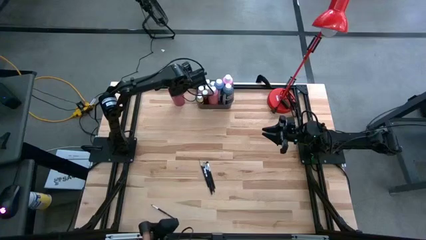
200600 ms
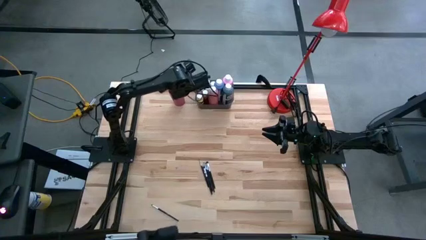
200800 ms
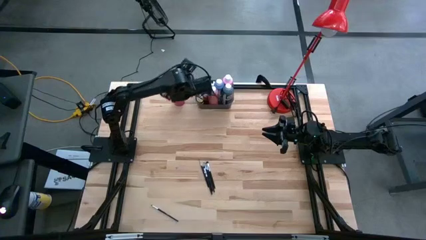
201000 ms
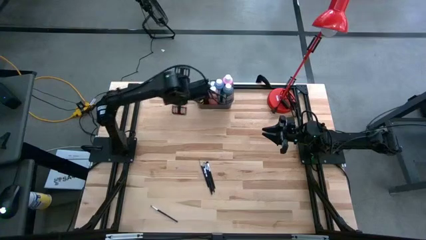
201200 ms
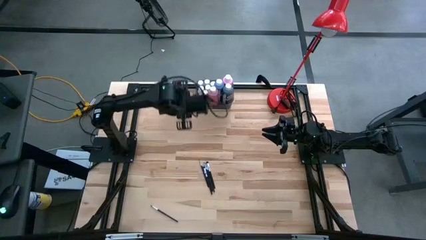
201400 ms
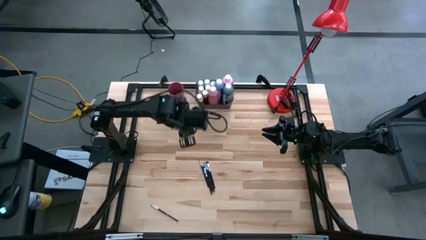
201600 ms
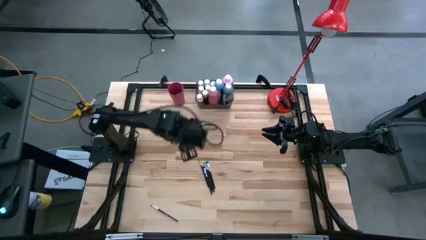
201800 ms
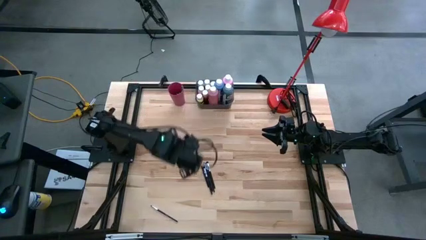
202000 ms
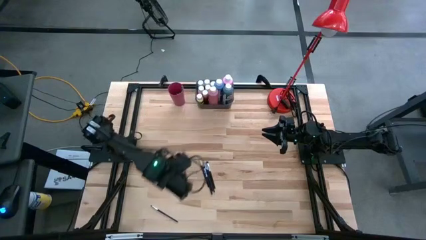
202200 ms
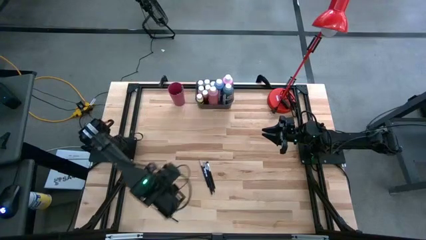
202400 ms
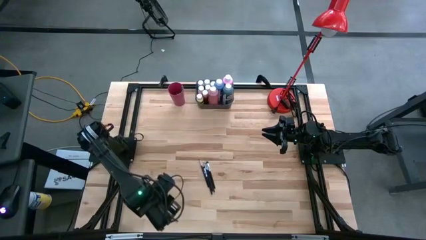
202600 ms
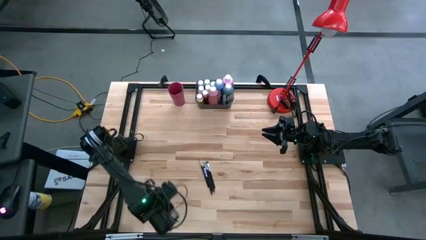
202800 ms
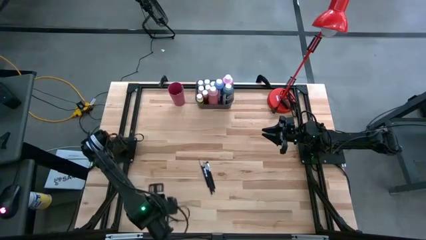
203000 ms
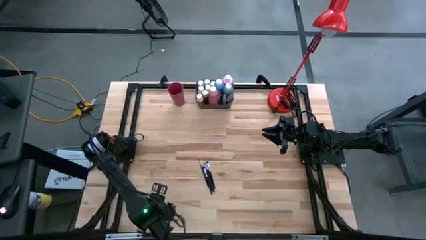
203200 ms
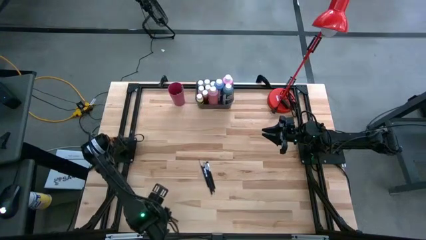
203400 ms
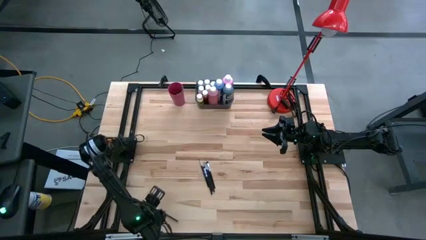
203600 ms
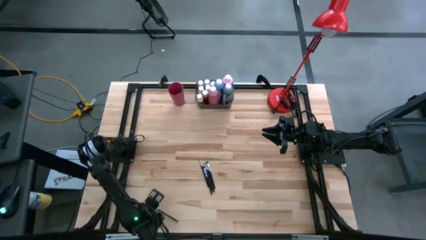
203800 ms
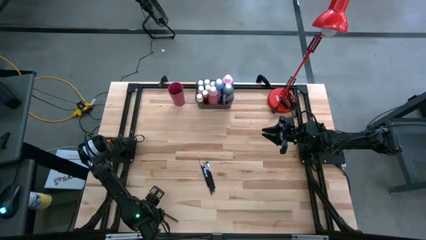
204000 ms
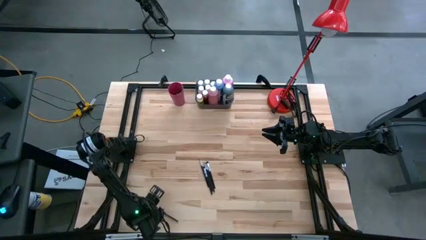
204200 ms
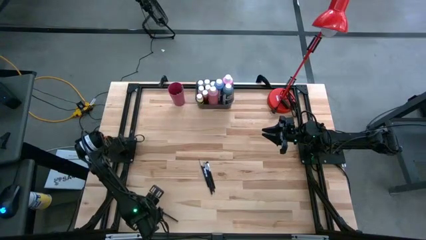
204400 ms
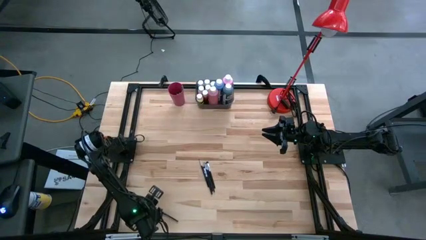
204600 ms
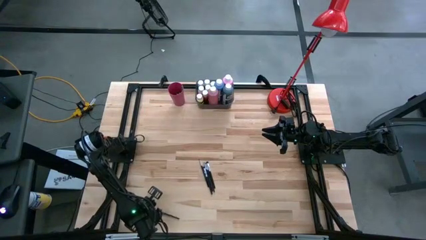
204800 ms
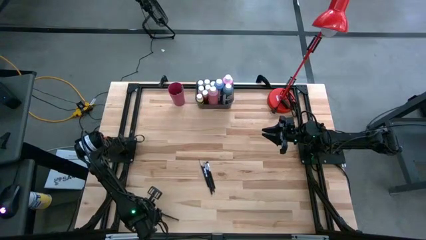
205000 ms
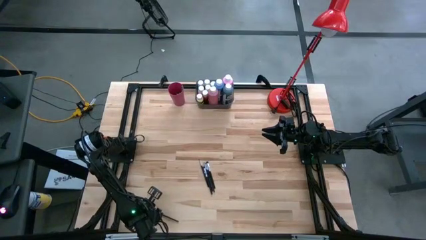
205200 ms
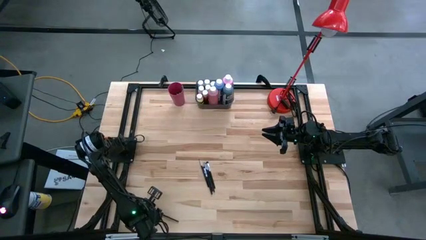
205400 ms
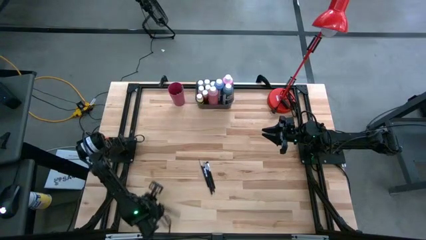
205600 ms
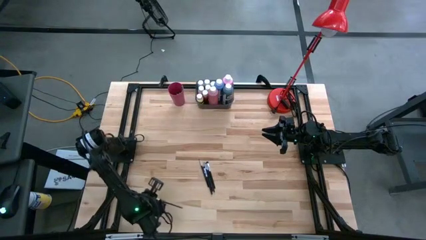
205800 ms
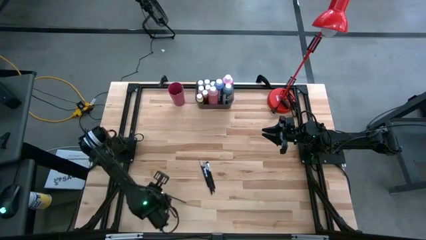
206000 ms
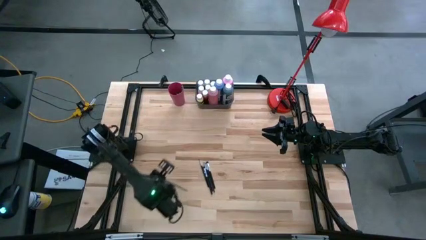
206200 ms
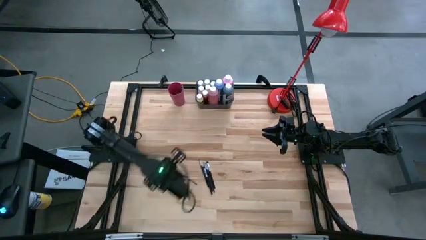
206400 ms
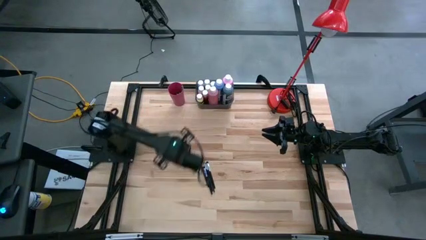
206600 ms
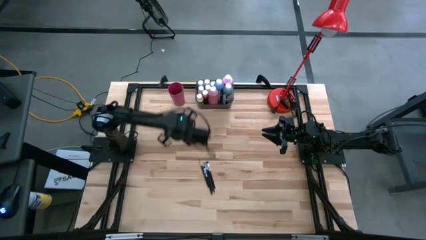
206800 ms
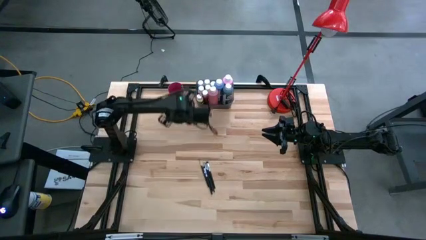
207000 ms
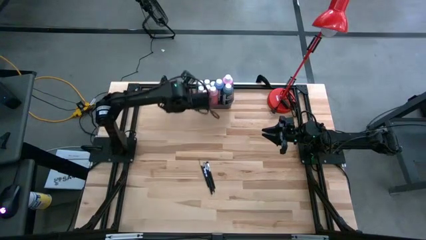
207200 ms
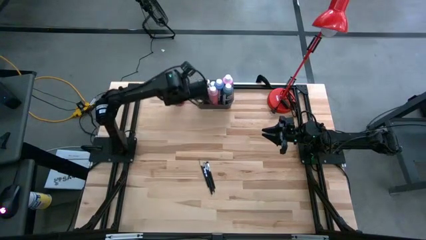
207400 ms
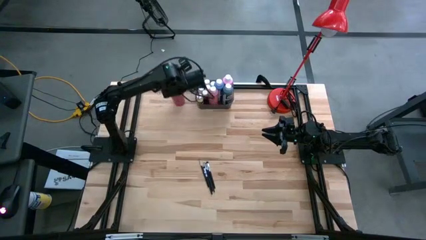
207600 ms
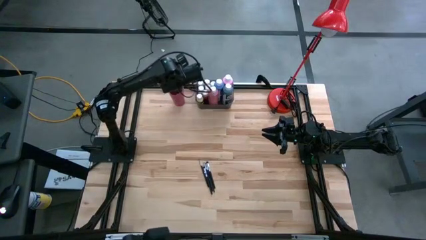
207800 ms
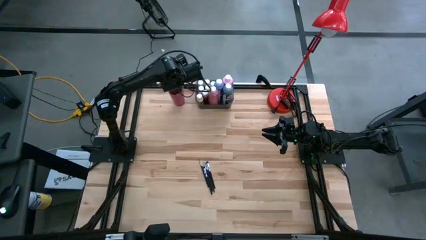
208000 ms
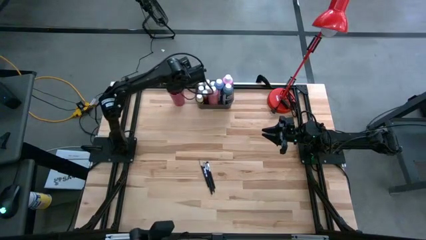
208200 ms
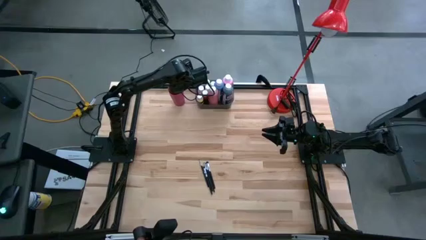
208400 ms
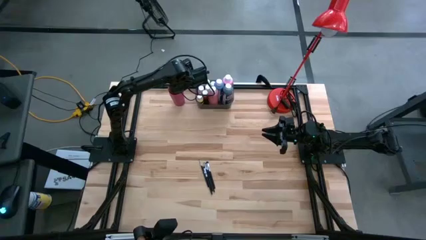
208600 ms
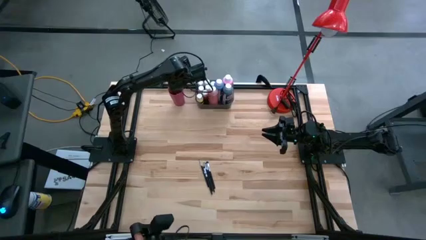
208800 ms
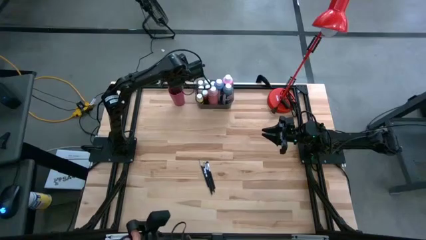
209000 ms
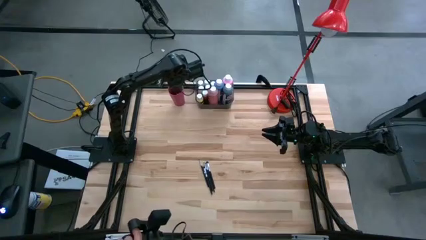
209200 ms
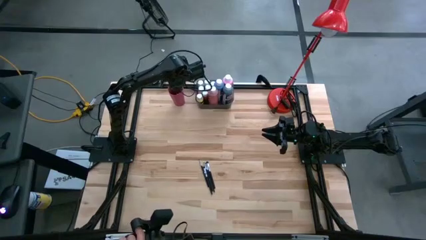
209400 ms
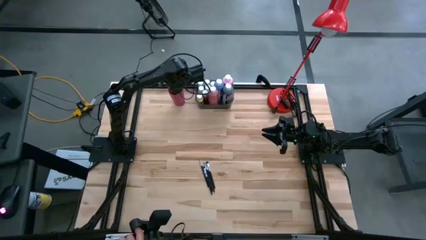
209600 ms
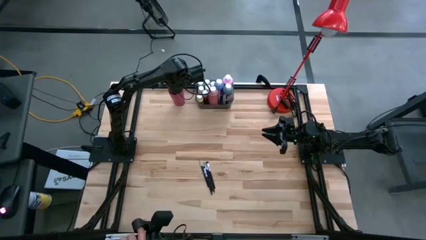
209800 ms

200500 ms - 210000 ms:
Task: Pick & Place Paint Supplies
Put the black paint brush into the pink cup

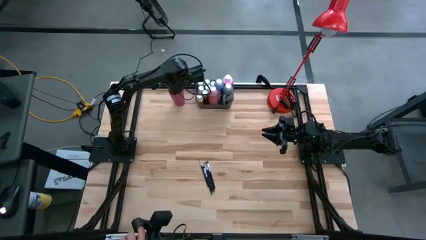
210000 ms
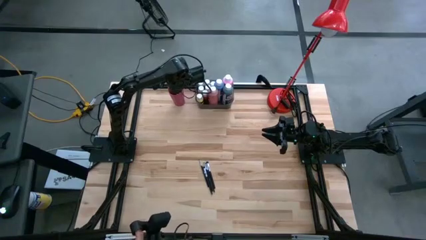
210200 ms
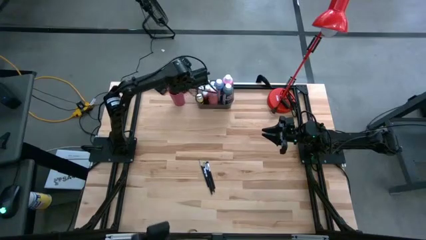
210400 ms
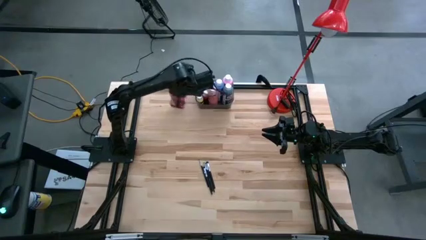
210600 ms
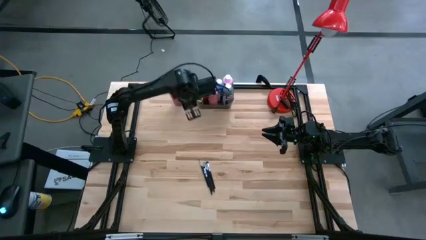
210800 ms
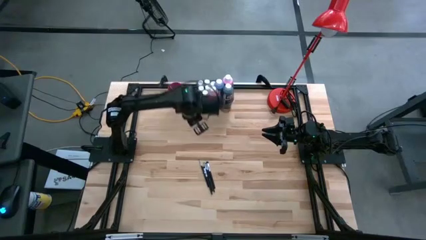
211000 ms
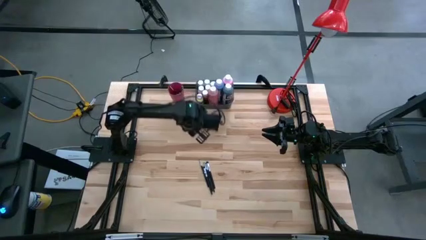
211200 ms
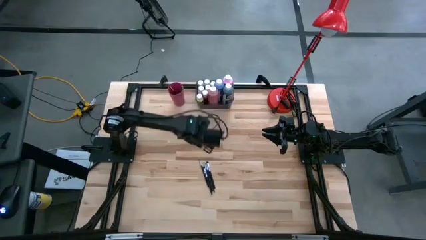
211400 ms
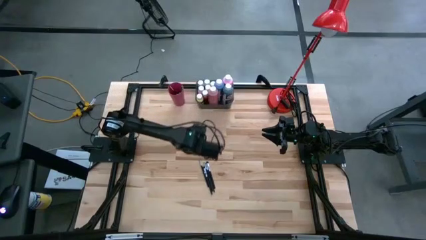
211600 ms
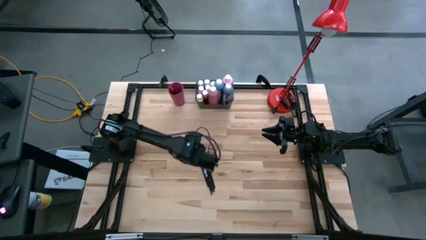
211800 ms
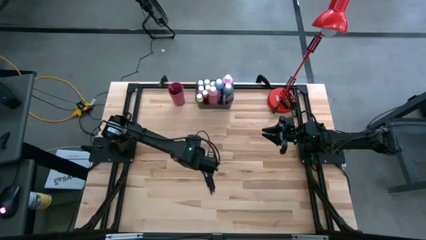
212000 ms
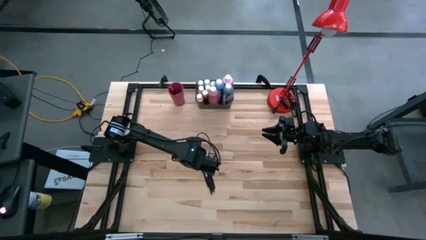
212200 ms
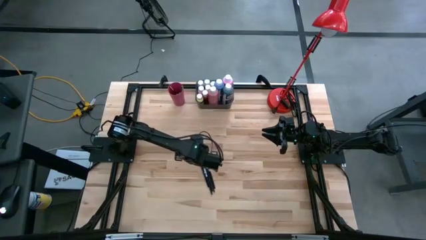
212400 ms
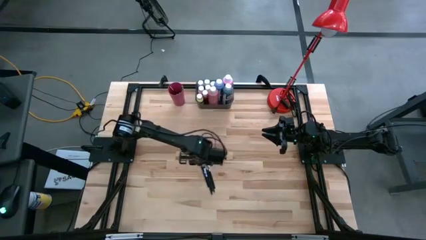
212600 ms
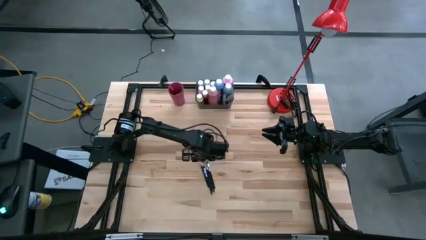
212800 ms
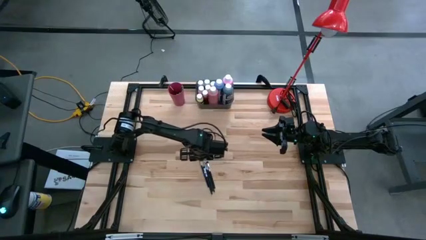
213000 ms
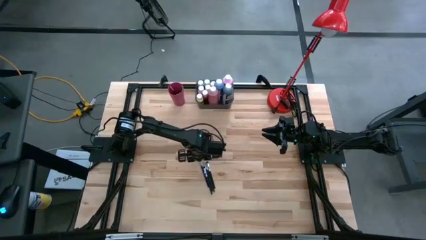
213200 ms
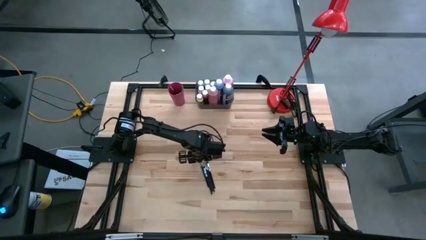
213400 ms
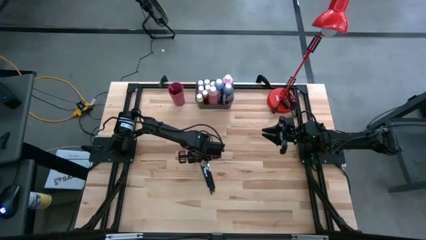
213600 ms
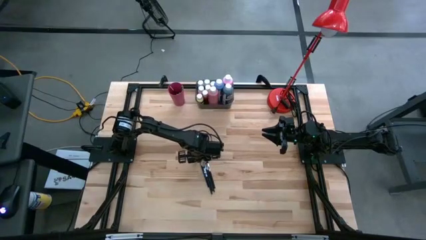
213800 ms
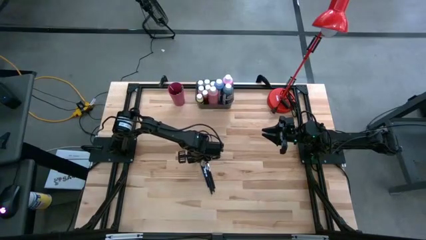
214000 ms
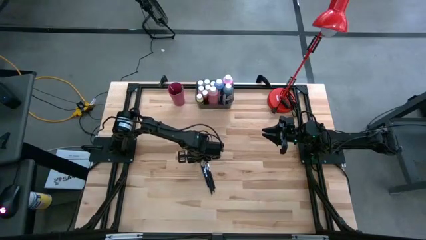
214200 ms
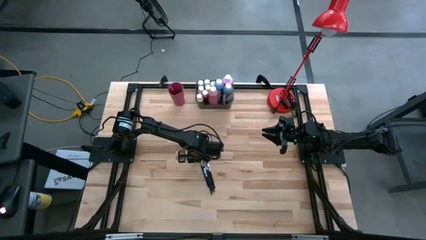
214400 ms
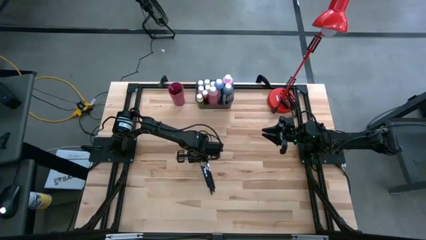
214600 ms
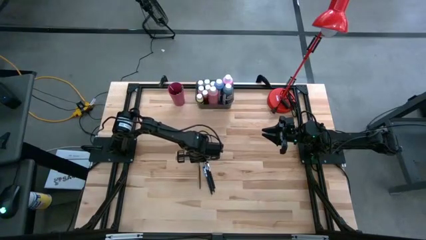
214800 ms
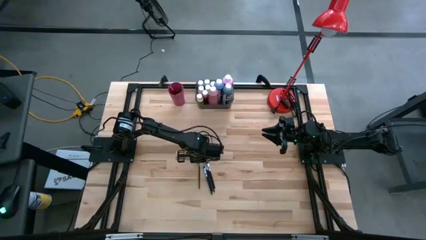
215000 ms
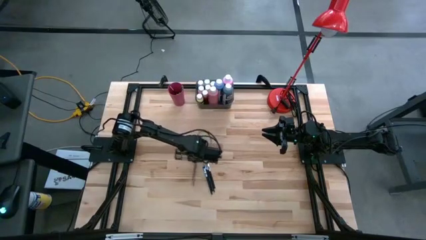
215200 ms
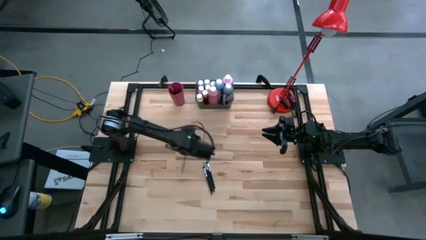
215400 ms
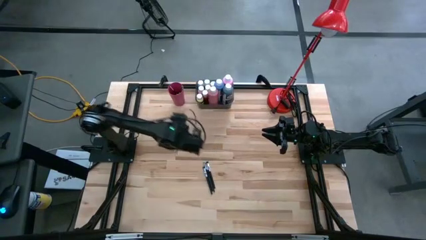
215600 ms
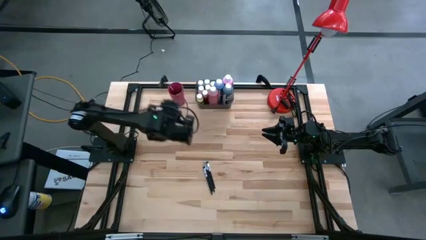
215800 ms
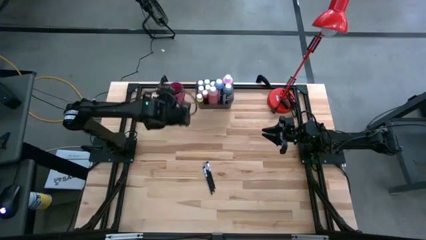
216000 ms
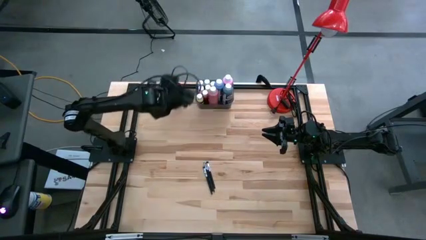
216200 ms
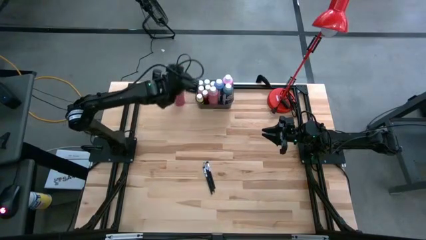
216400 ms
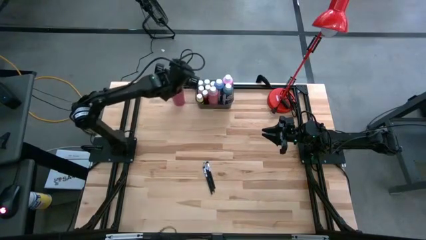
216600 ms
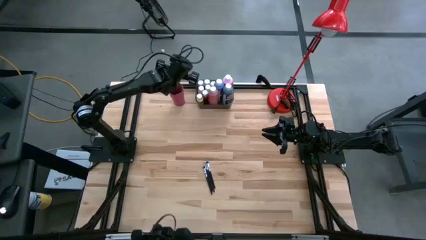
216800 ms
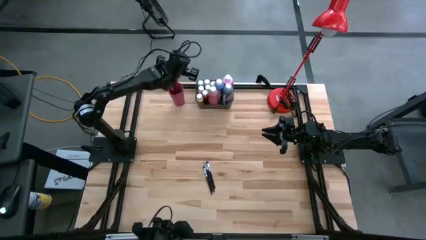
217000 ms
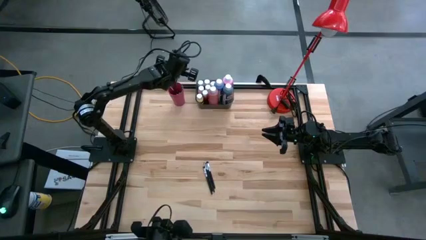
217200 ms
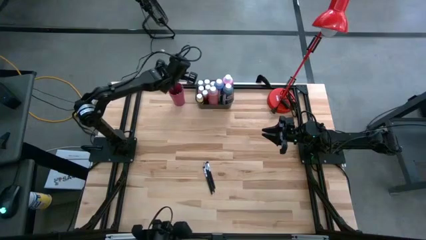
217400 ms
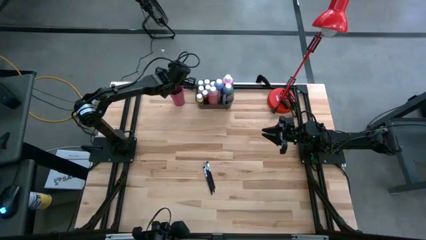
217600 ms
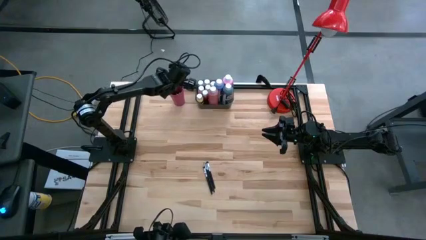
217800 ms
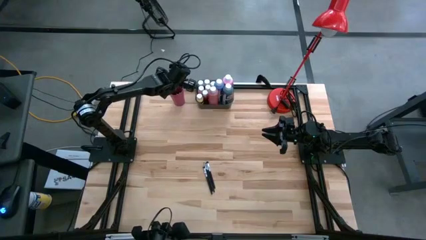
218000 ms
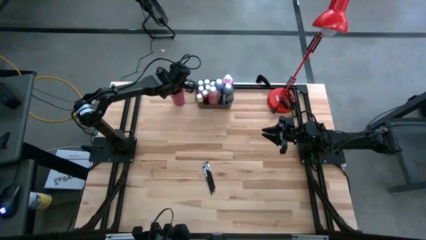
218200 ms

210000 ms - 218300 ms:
Put the black paint brush into the pink cup
